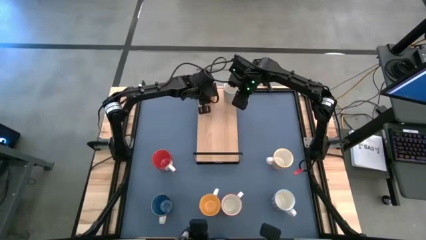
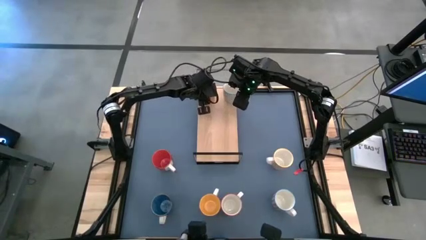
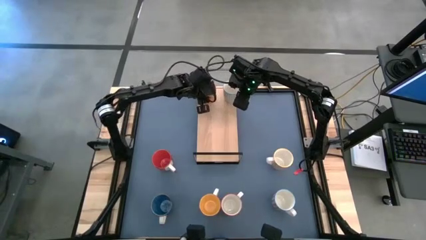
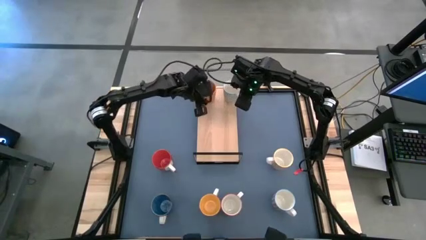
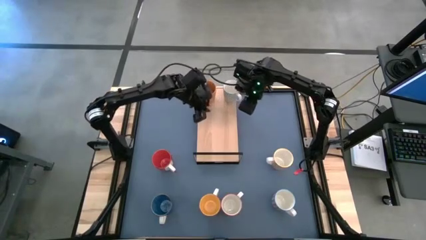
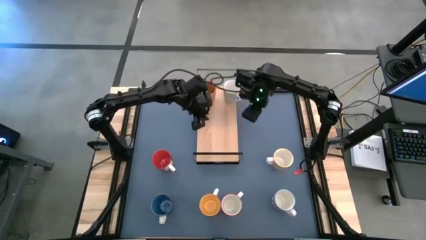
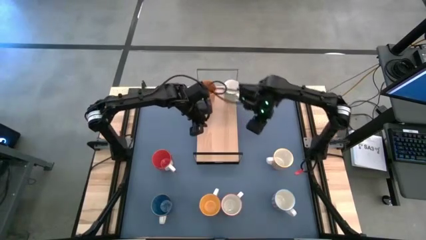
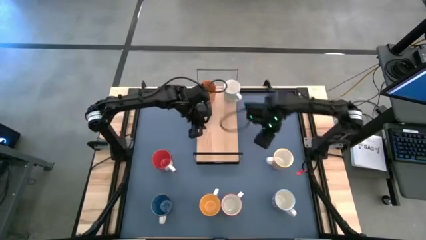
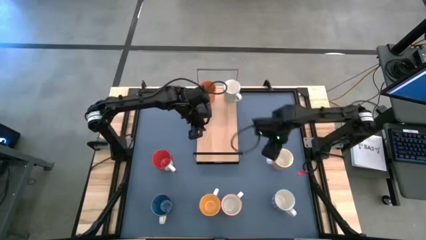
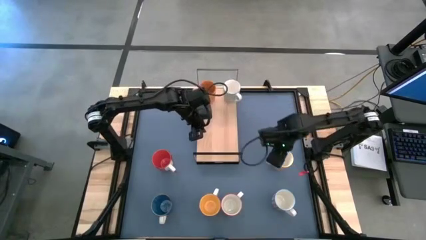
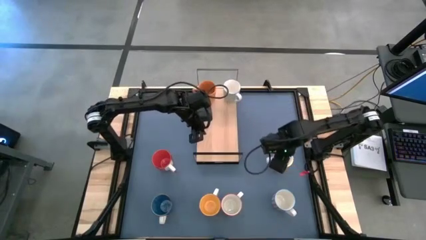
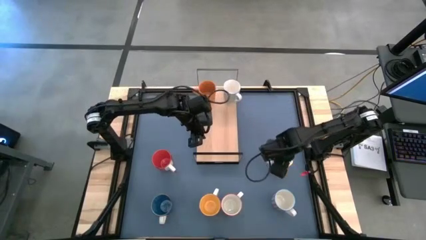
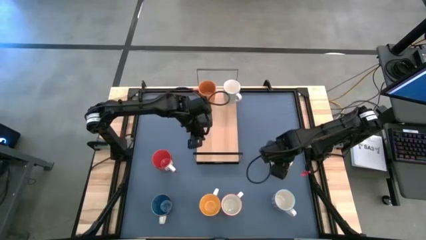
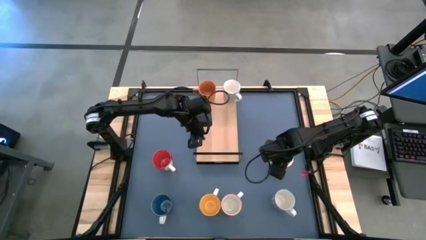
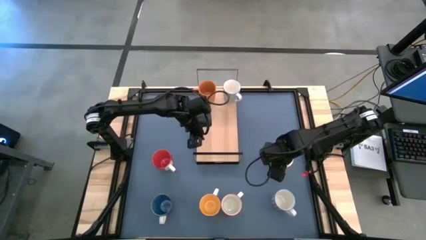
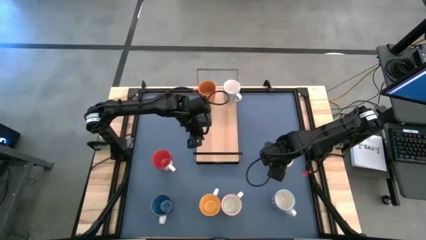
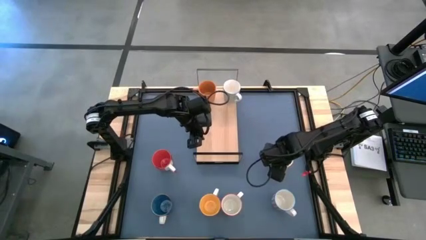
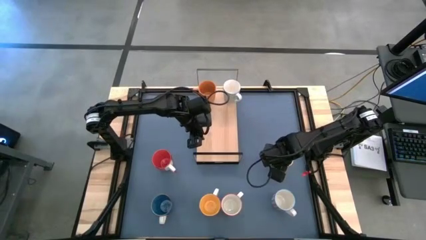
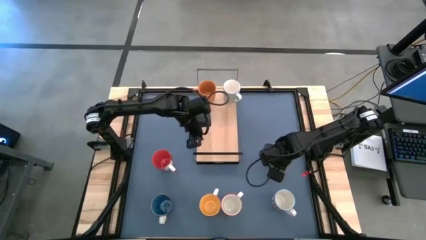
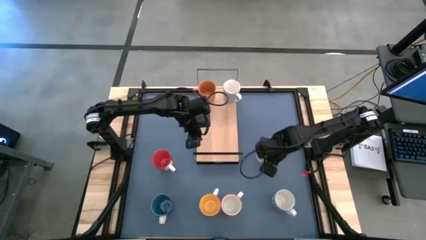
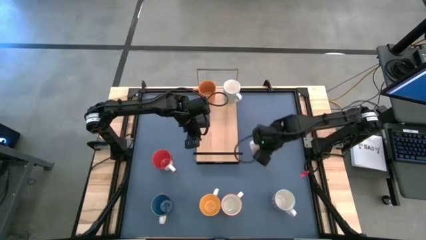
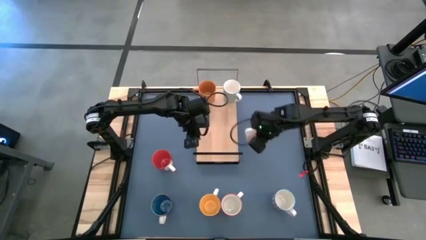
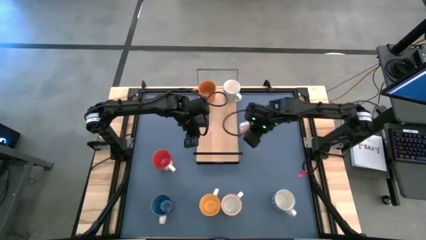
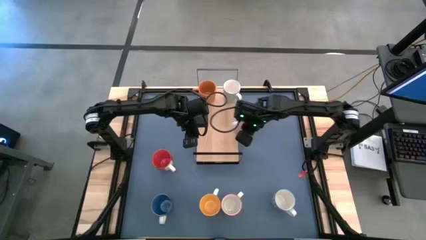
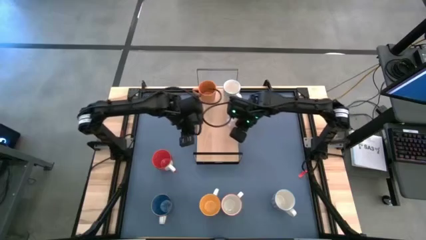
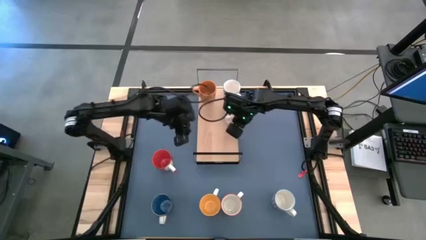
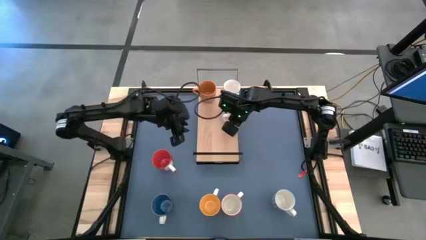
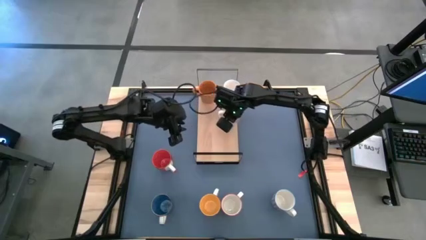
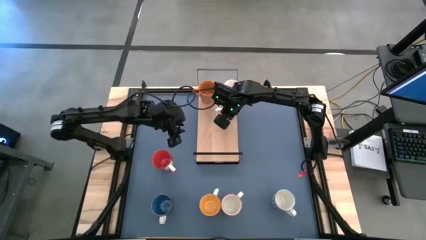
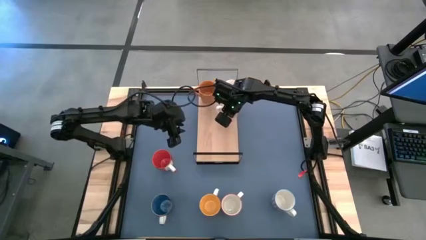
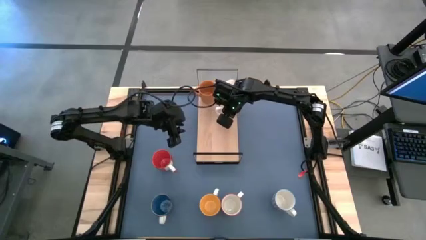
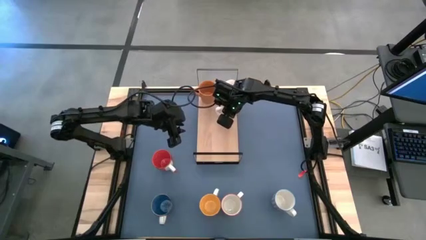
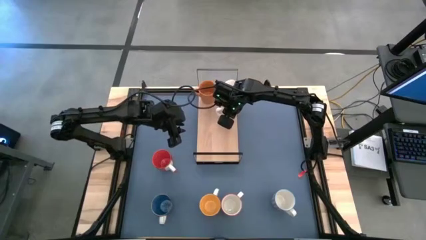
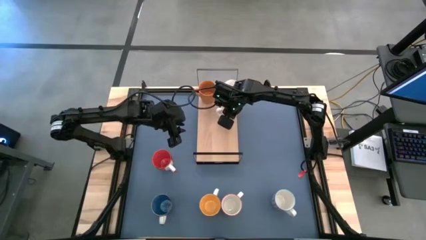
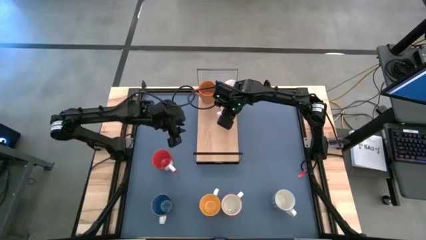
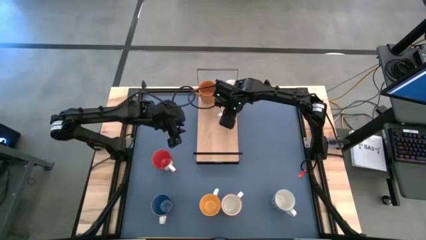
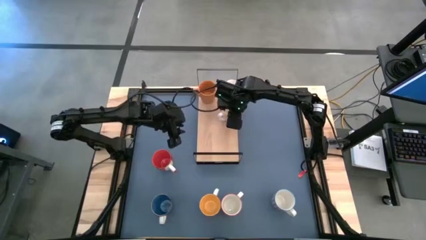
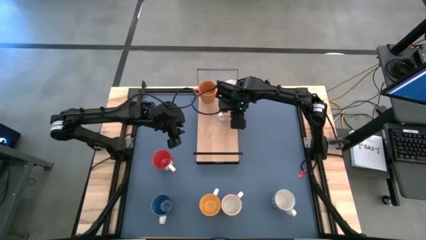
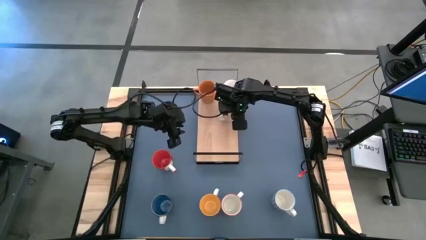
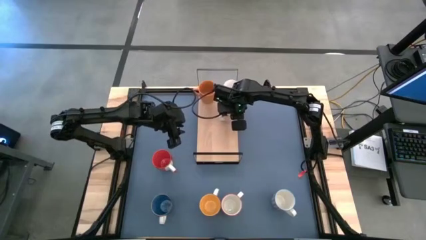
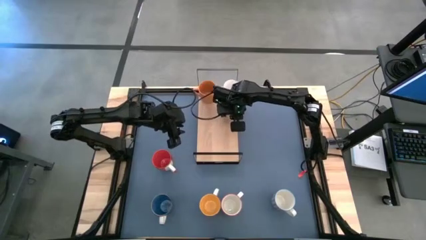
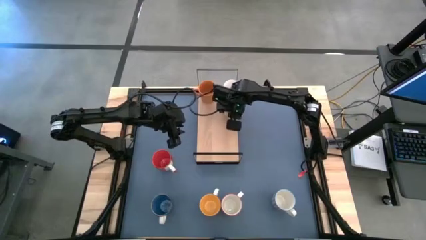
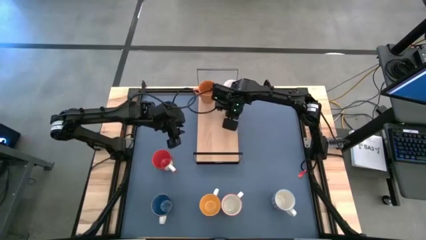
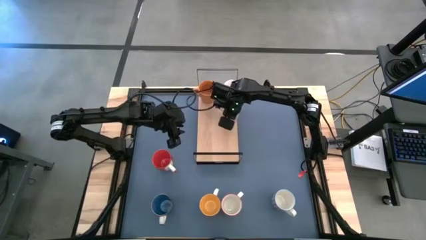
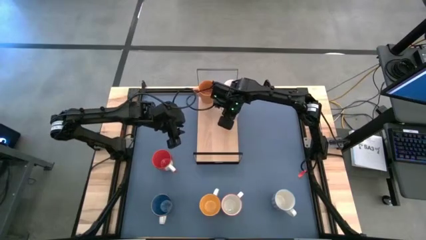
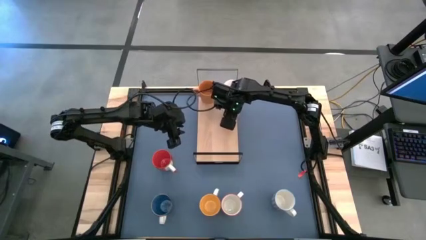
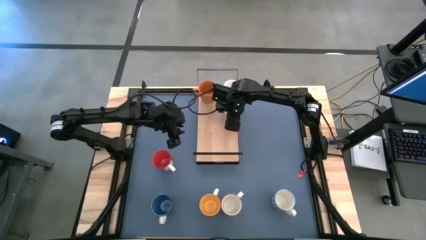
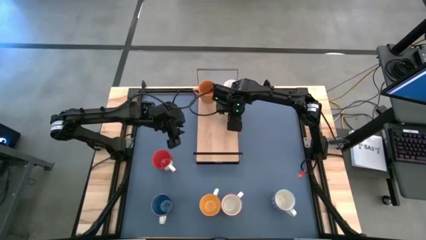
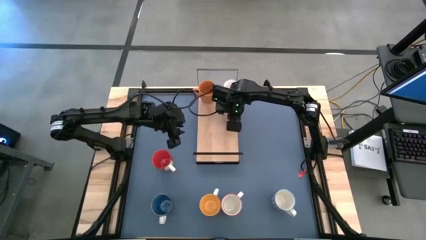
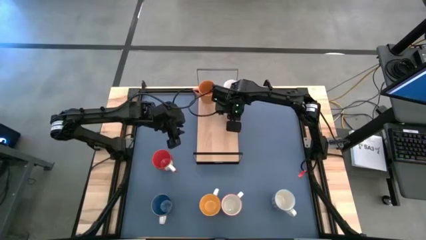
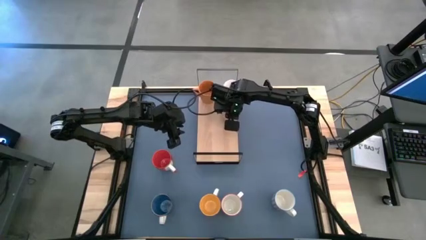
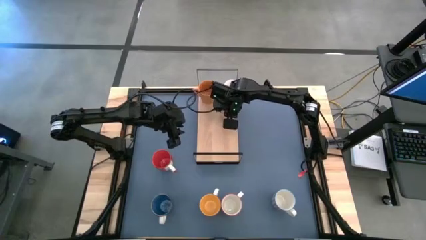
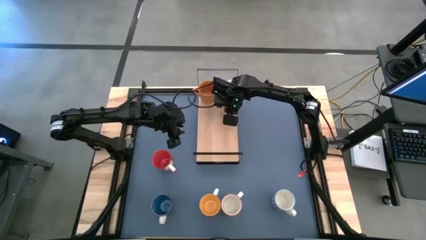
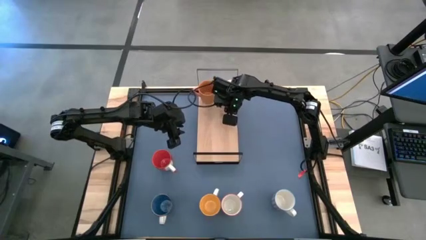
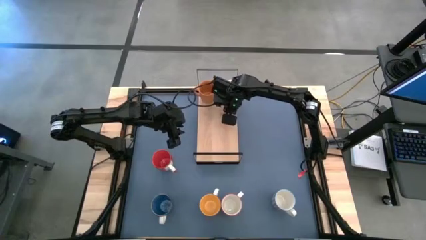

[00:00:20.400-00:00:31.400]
Task: Place coffee mugs
Put the orange patterned mug on the shelf
